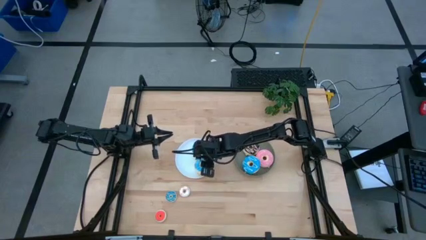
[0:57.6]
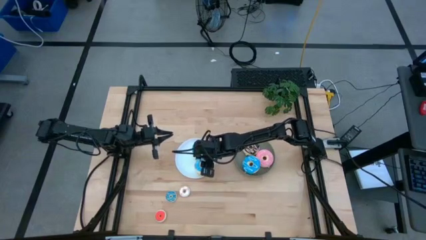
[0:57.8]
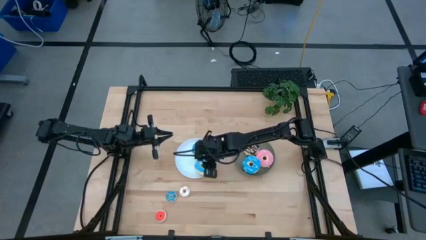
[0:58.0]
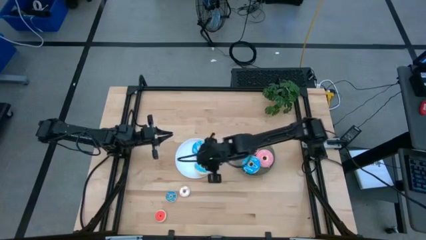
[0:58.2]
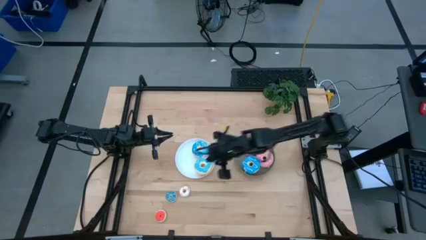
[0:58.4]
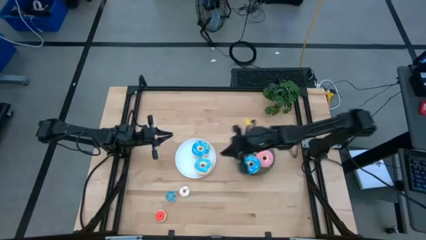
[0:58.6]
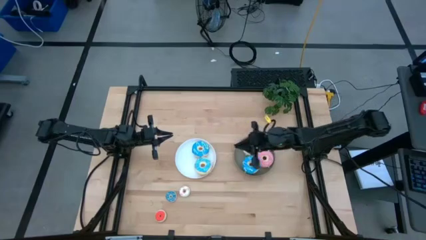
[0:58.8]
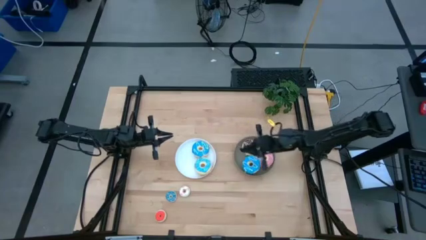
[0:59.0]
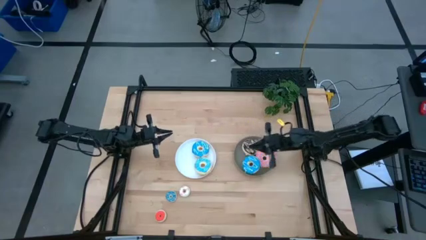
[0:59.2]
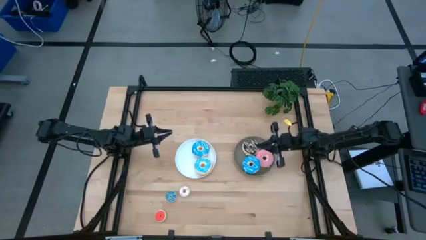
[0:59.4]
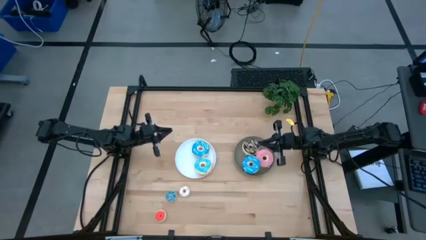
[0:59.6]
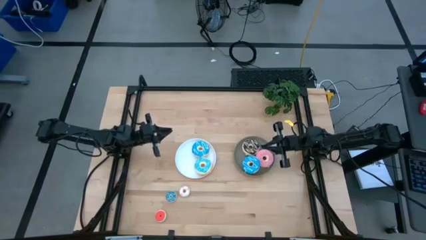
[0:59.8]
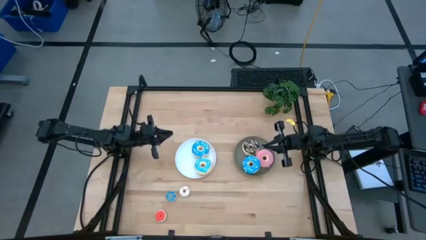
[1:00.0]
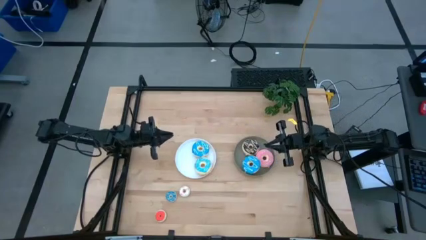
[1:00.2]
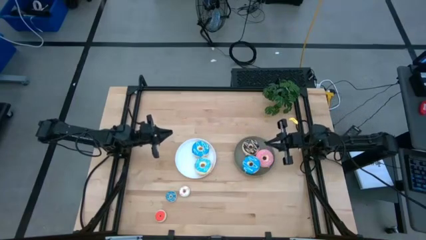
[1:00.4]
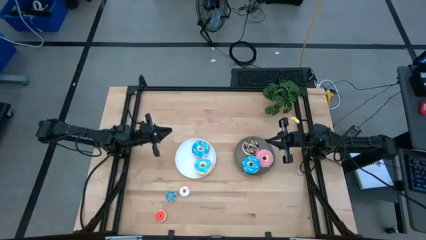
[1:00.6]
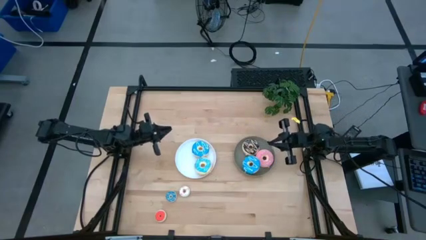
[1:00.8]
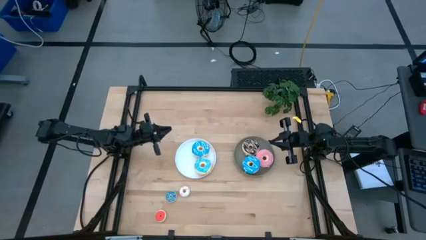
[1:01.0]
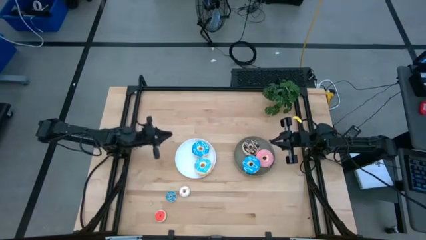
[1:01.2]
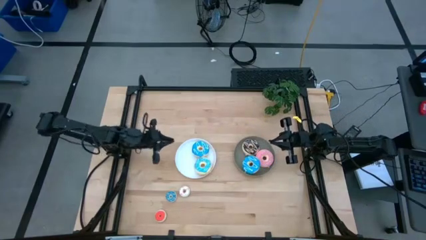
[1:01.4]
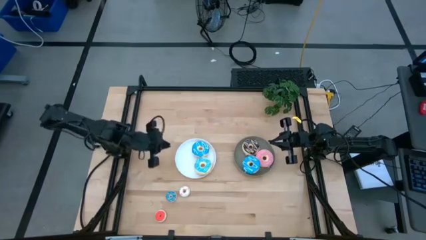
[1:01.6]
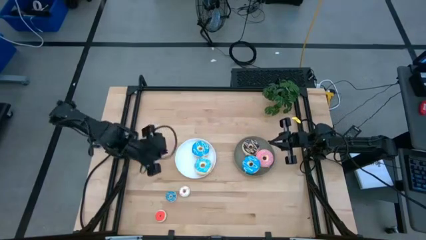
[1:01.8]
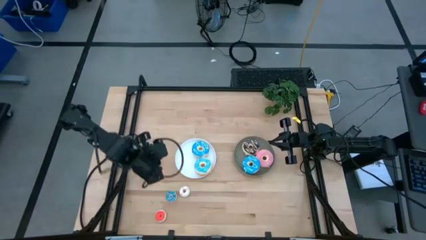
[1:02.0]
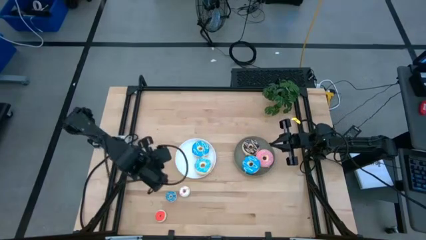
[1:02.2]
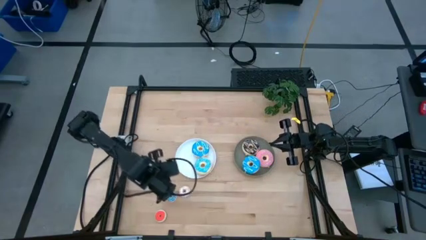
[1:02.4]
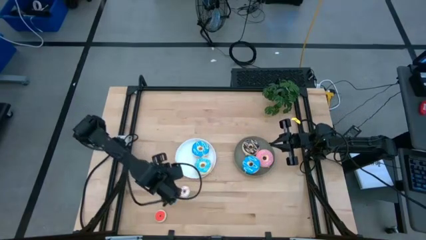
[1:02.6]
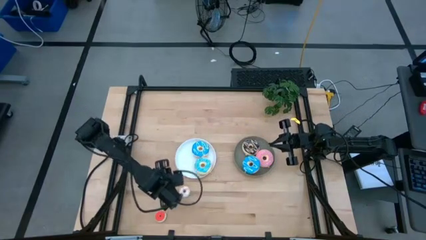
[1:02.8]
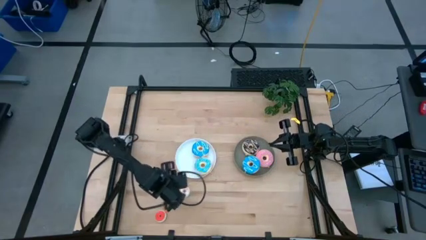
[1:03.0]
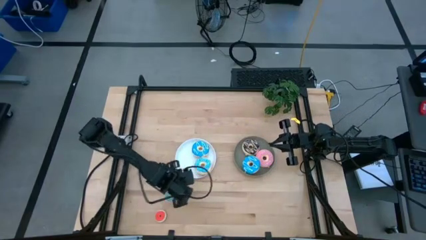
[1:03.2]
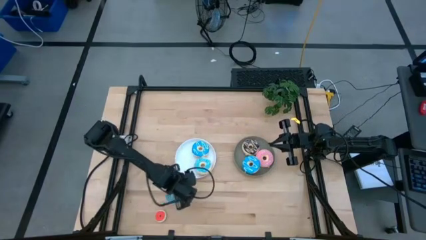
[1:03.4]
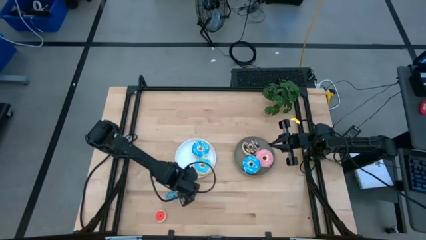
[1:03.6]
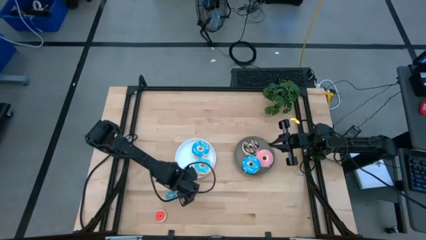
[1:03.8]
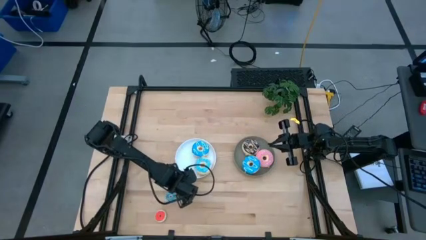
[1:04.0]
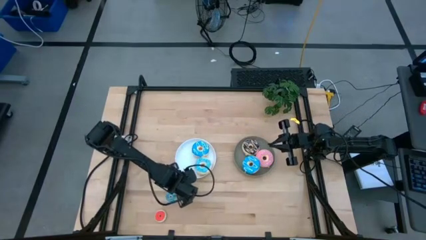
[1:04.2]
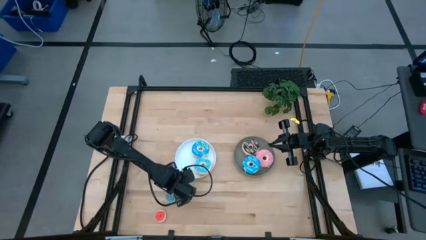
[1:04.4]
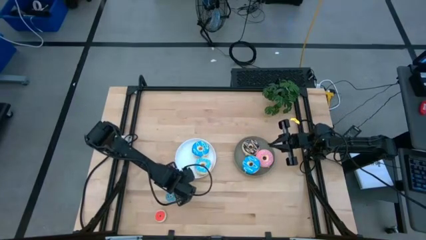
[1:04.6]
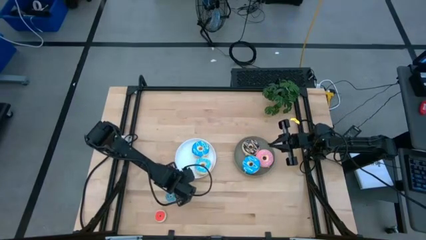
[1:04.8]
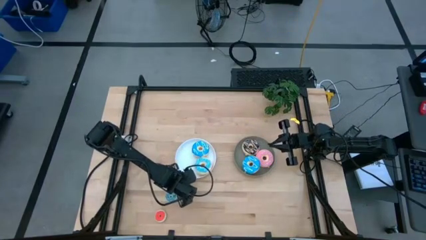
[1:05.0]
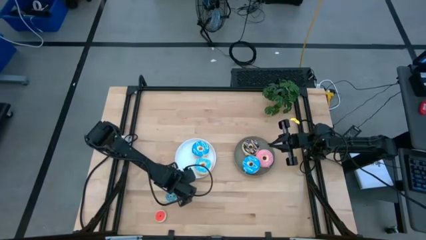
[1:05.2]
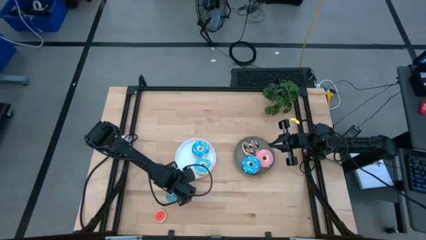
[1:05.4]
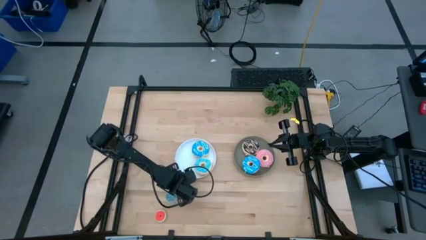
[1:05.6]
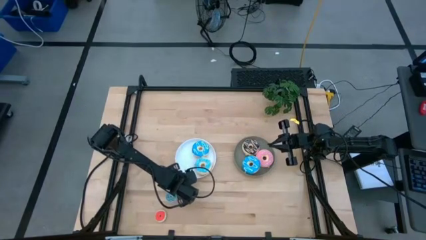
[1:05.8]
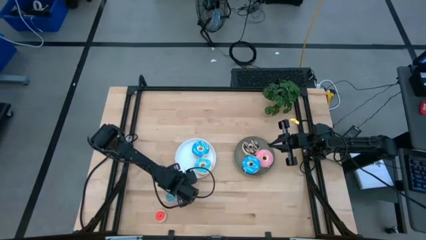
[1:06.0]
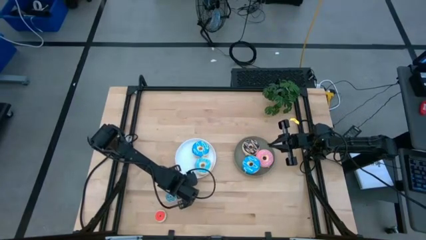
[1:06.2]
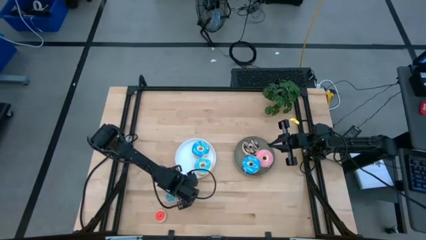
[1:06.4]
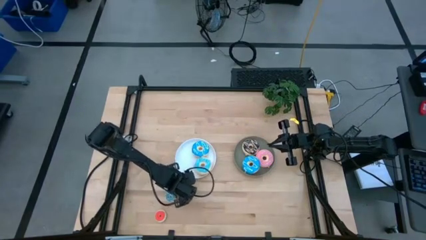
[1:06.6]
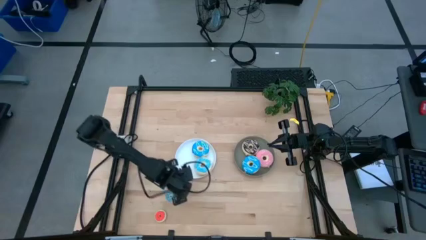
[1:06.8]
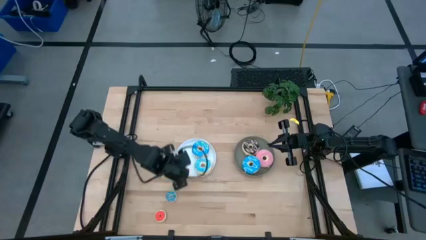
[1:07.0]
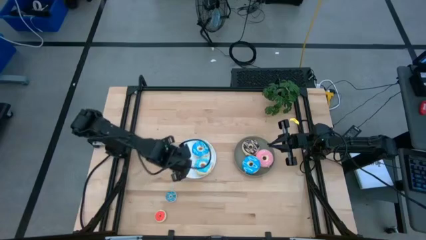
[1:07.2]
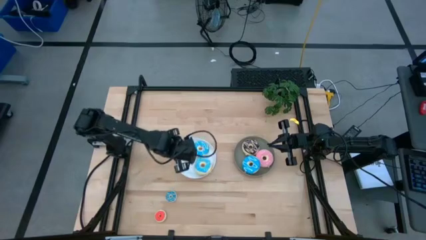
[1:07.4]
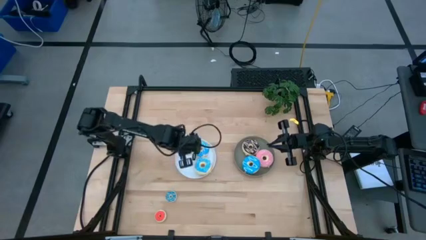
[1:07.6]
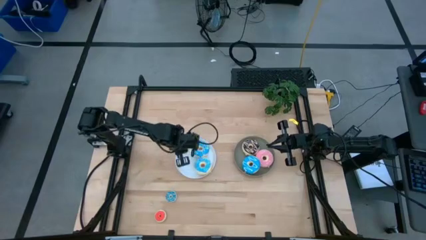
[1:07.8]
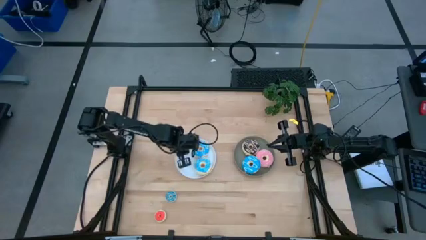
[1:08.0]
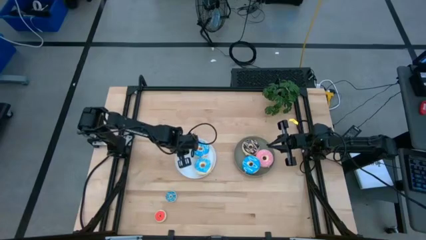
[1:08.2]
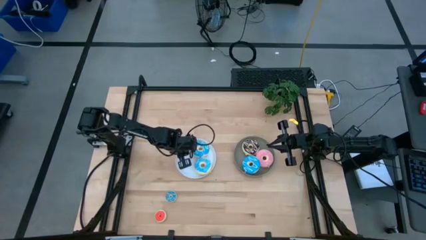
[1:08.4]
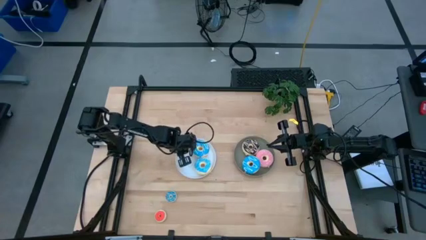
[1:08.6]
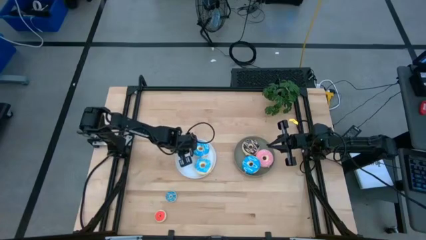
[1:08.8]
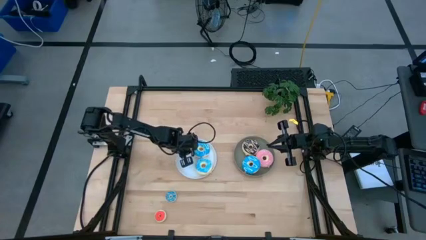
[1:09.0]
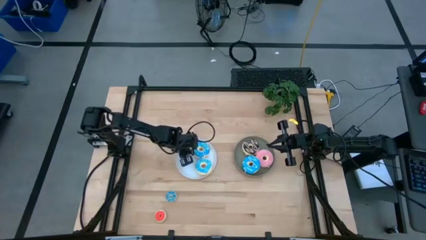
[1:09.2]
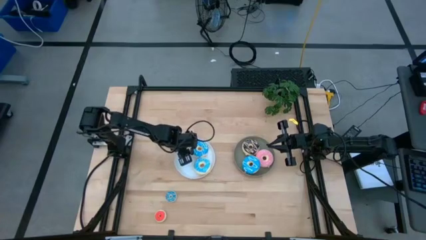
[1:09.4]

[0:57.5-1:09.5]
Task: Pick & Place donuts
Put the small white donut on the white plate

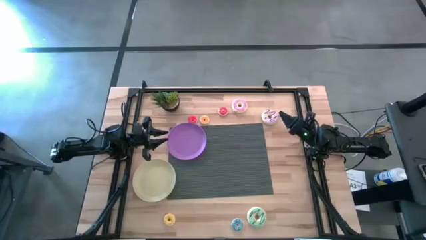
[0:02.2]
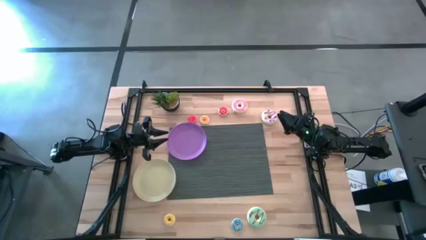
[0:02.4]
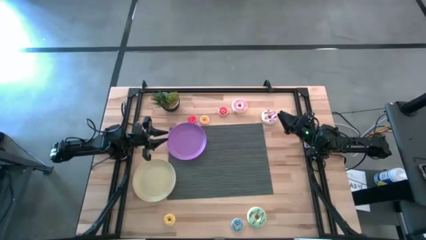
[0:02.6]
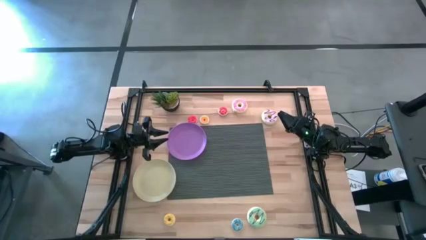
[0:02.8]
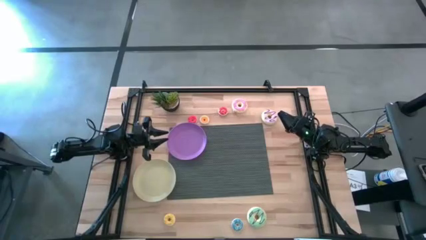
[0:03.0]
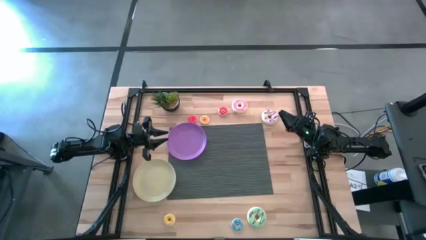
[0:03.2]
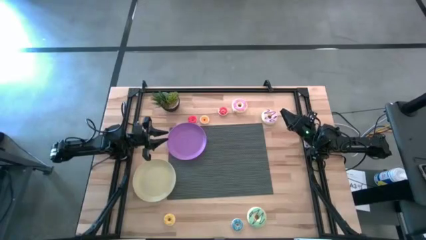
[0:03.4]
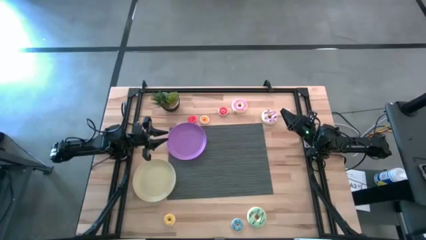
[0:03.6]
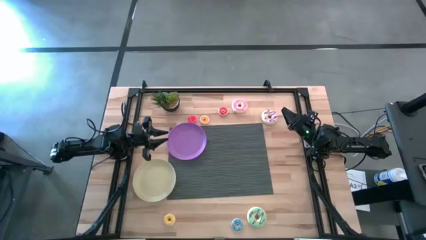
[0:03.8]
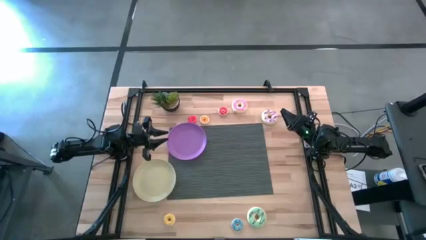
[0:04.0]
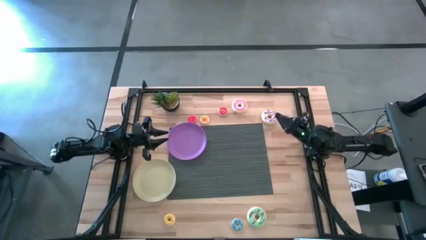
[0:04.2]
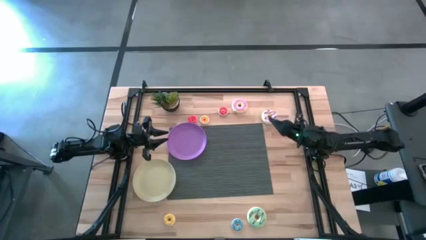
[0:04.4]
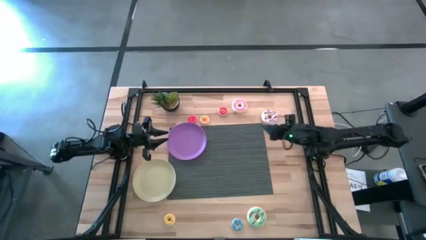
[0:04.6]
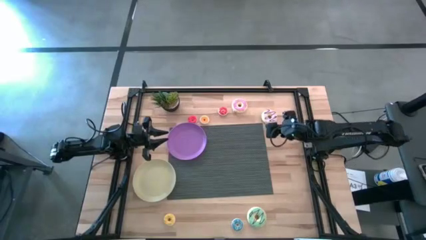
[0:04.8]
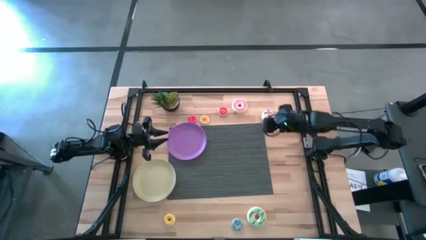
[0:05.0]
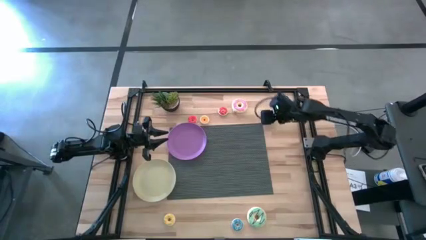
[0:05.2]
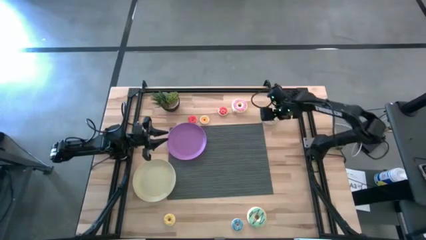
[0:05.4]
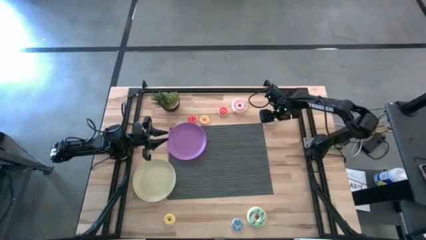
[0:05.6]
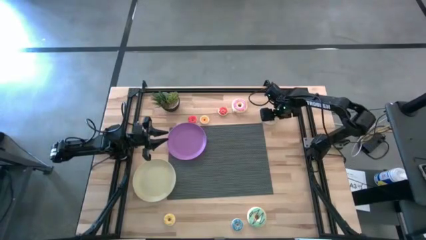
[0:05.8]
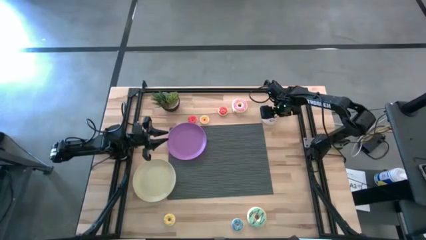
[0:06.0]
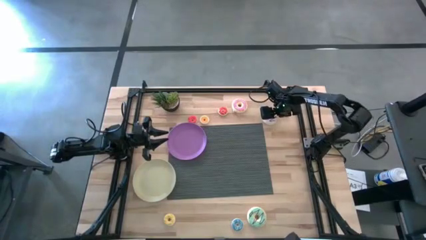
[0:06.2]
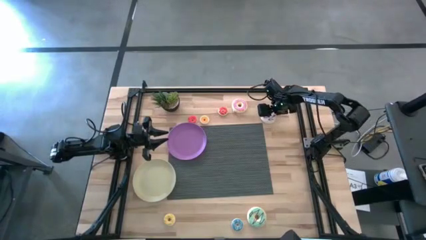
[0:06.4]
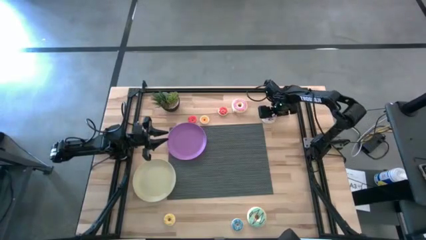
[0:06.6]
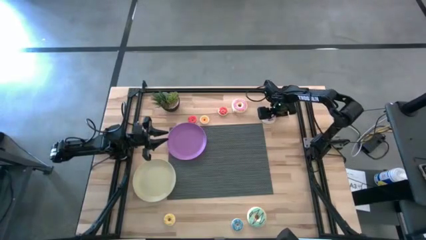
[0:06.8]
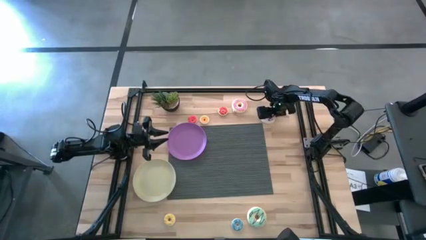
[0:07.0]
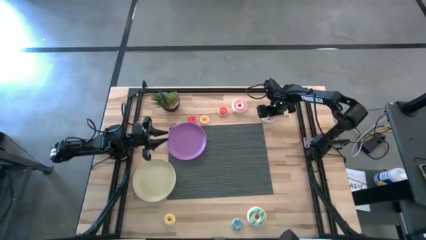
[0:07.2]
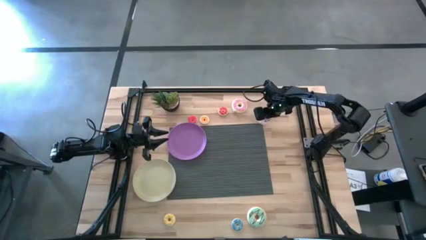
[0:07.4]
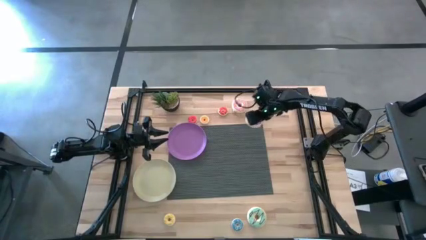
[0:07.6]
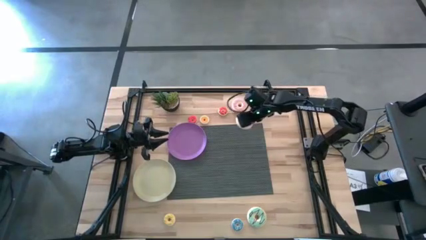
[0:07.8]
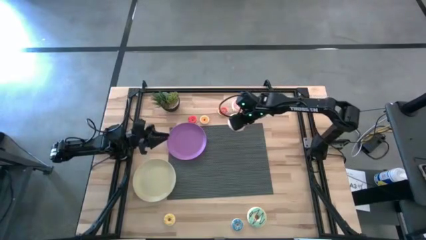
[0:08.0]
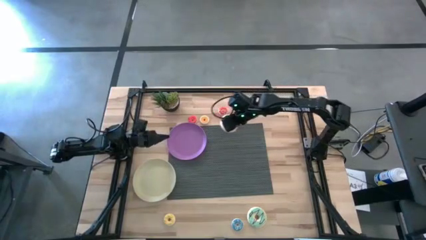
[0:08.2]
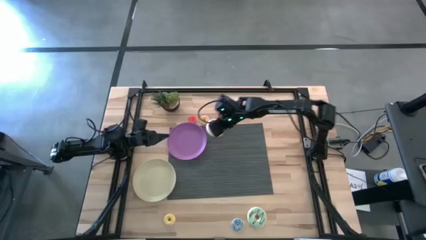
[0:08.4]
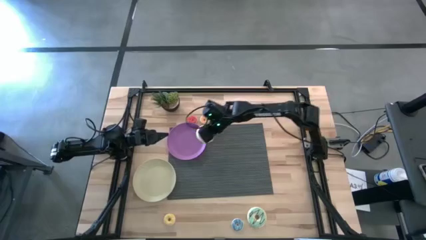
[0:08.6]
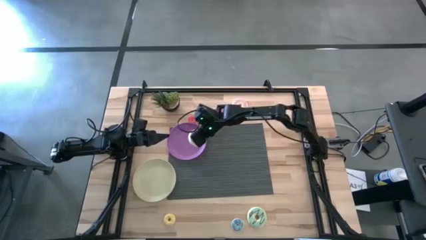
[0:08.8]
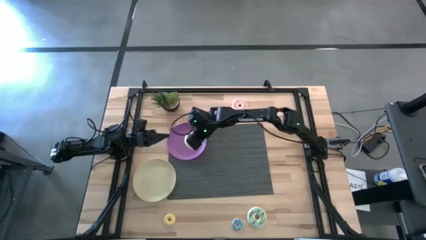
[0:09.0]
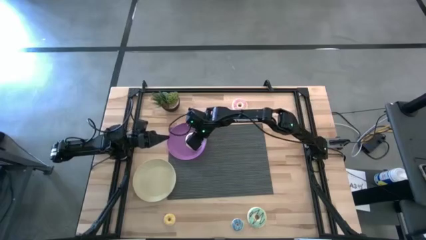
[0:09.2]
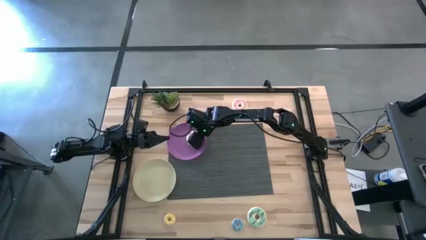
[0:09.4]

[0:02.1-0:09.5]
Task: Pick & Place donuts
Put the big purple donut on the purple plate
